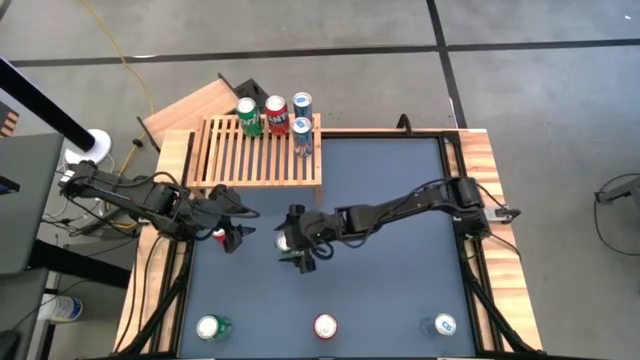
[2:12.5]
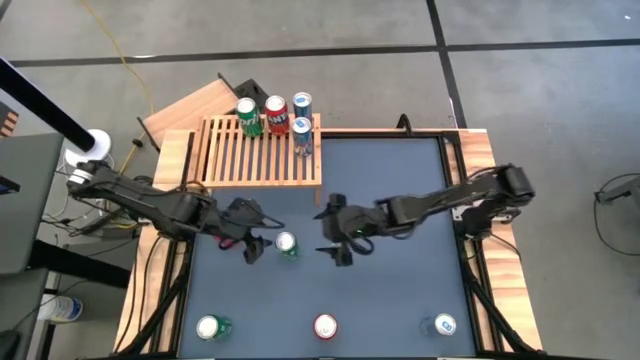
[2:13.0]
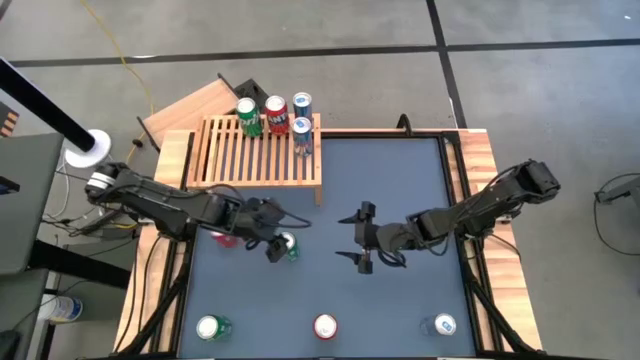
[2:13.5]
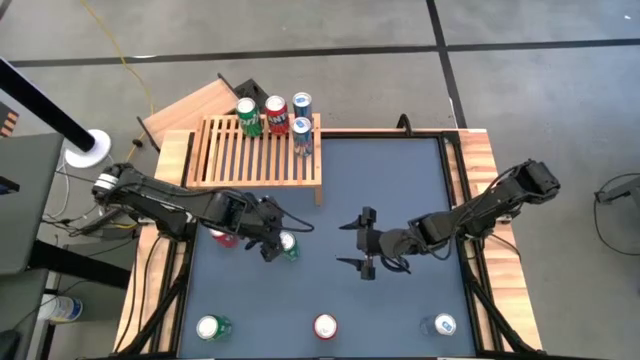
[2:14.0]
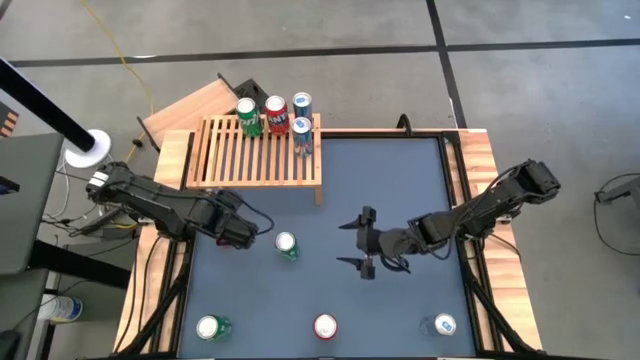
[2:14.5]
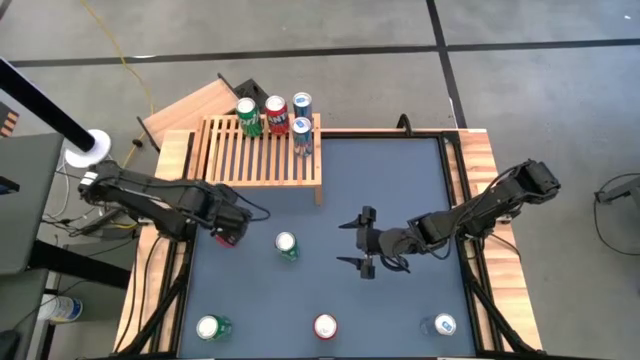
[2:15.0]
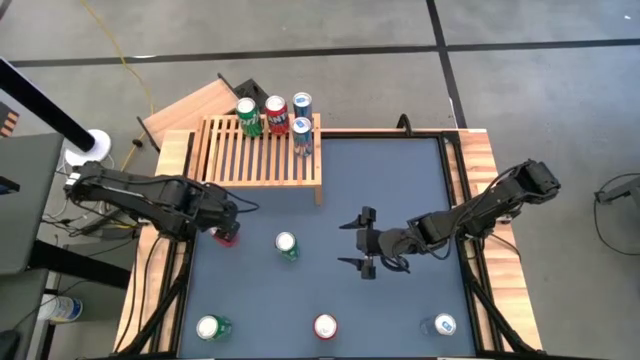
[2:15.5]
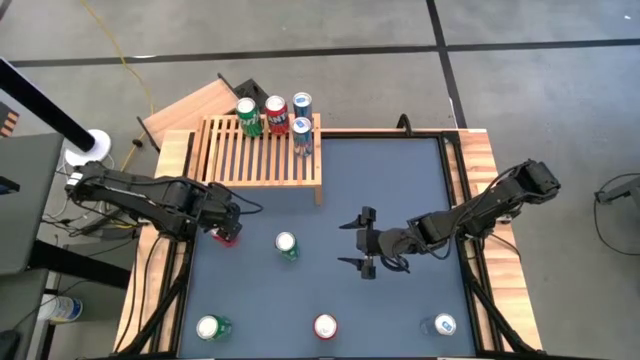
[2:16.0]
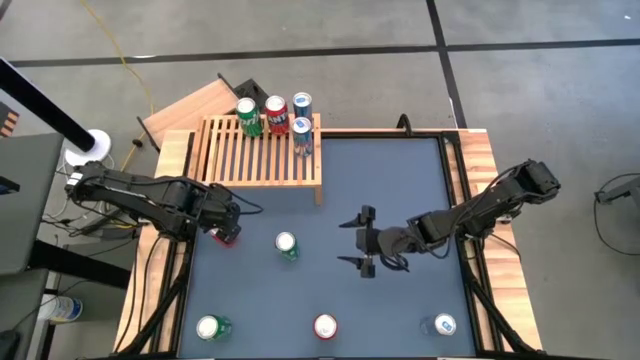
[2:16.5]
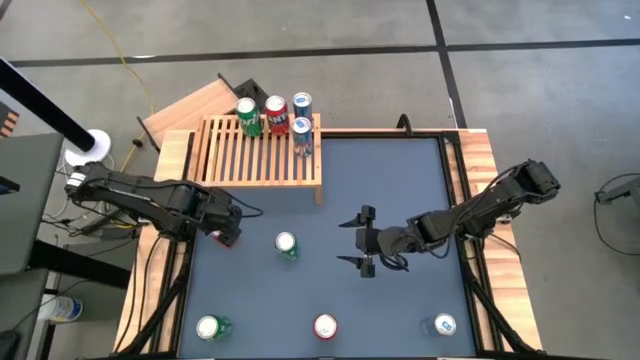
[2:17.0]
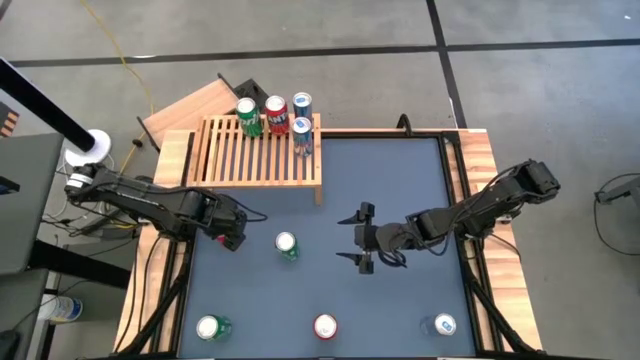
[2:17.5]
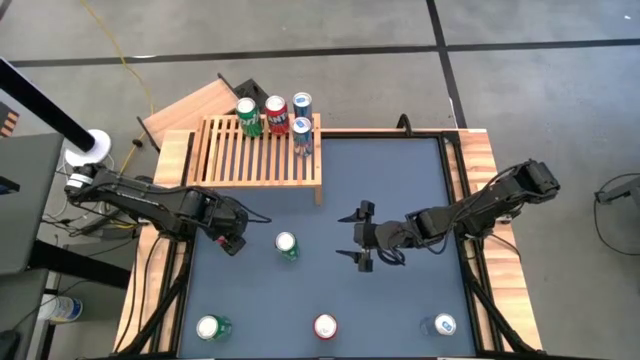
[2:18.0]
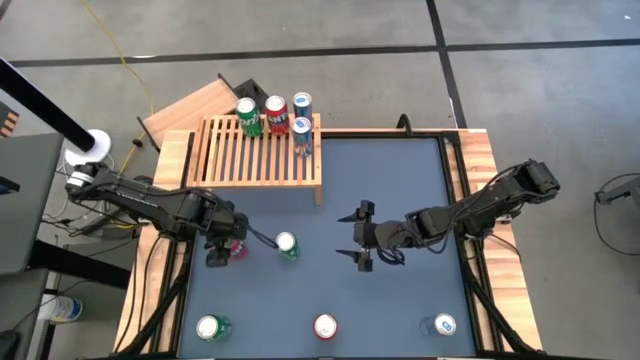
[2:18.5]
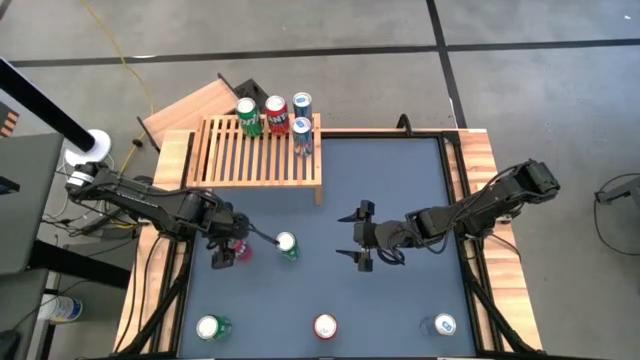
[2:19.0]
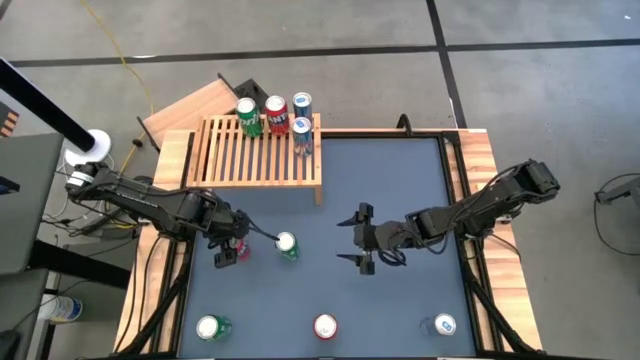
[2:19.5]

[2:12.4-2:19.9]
Task: Place canned beverage on shelf
Put the top red soda can on the shelf aligned with the other red soda can

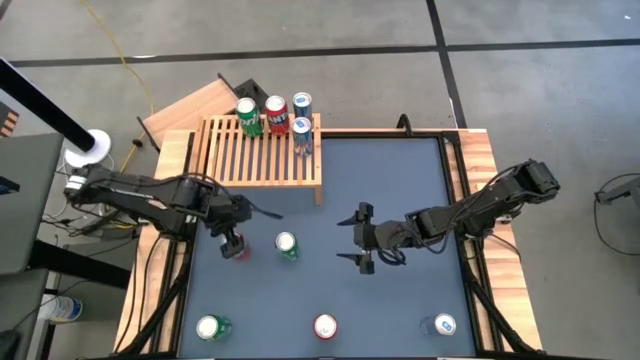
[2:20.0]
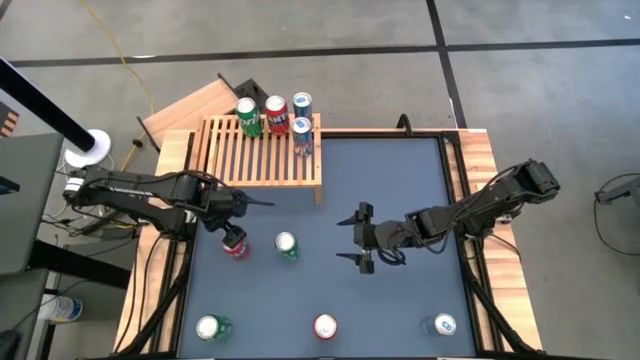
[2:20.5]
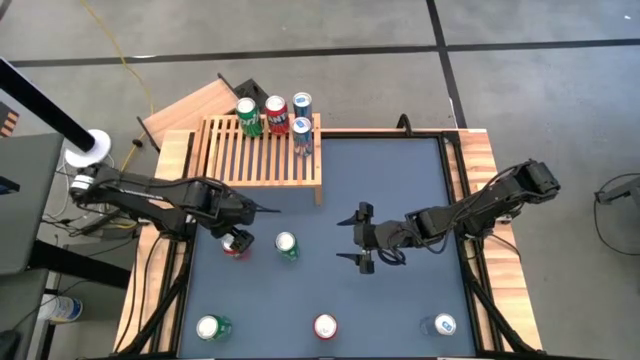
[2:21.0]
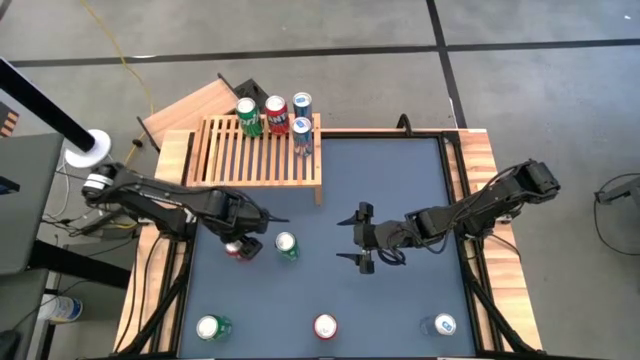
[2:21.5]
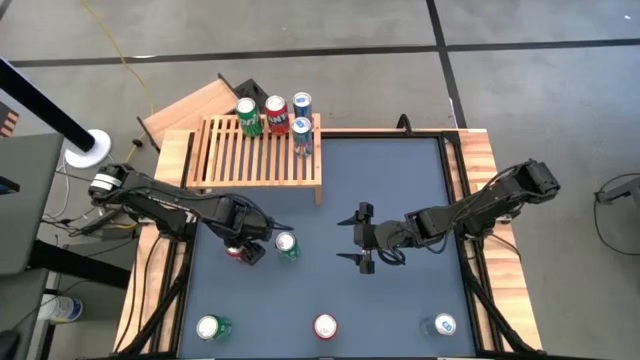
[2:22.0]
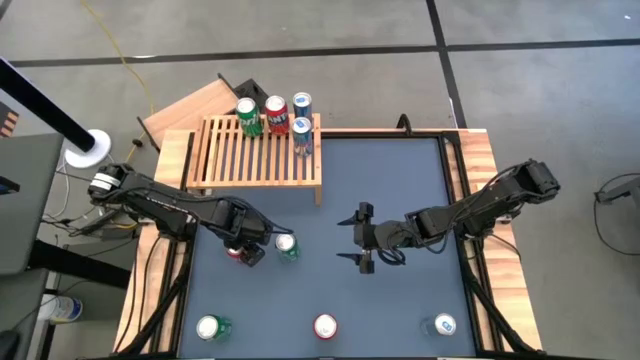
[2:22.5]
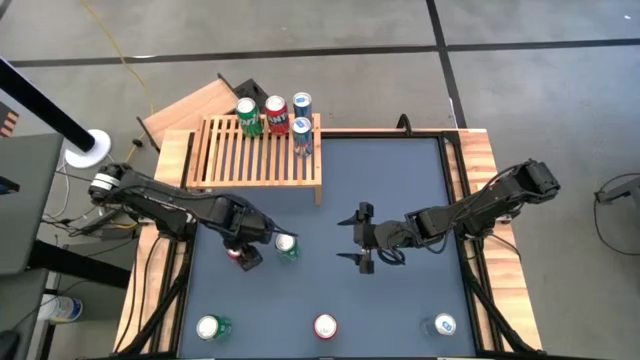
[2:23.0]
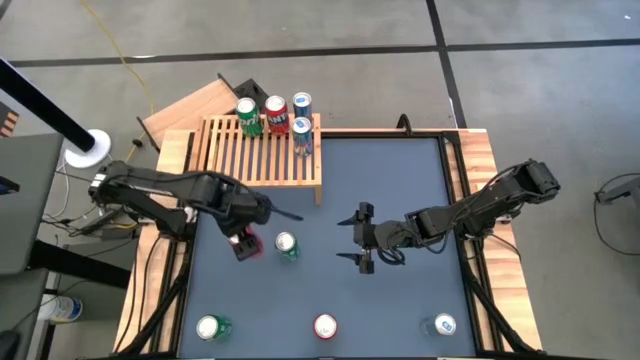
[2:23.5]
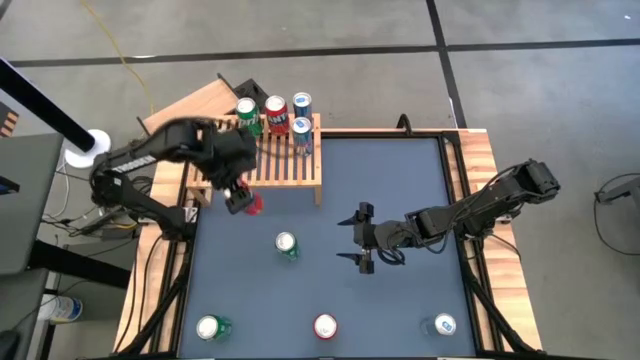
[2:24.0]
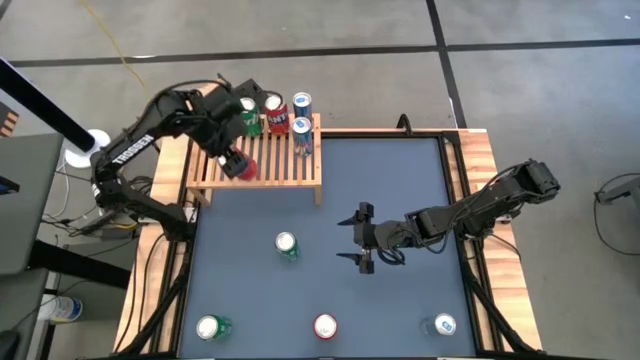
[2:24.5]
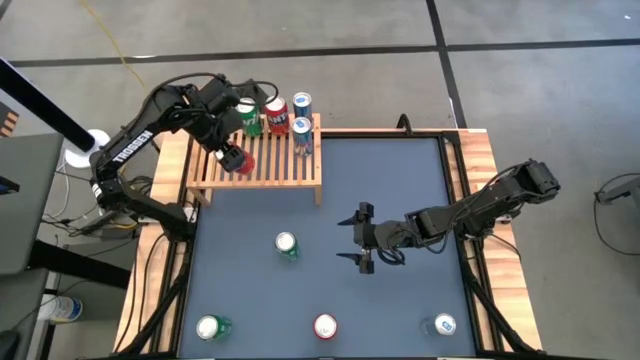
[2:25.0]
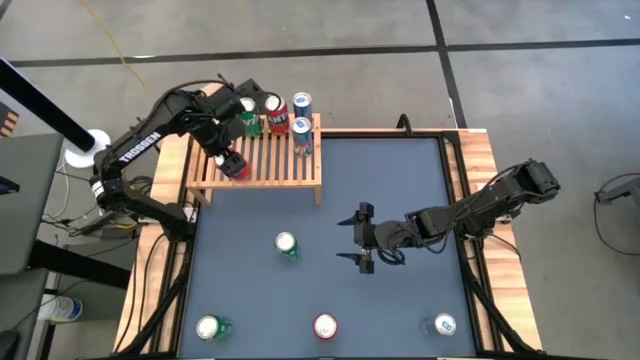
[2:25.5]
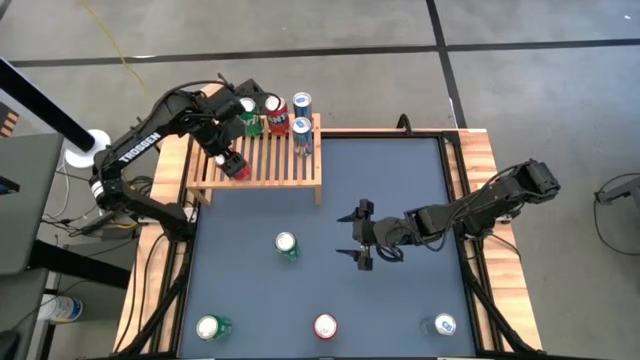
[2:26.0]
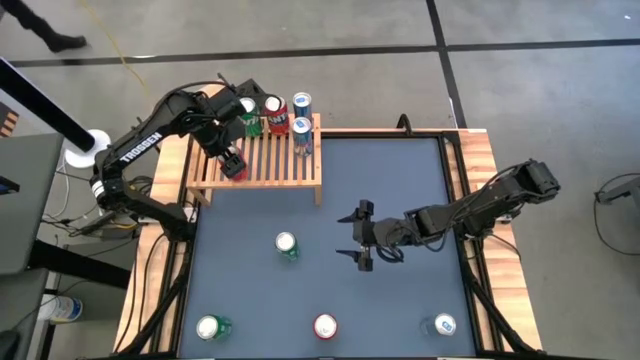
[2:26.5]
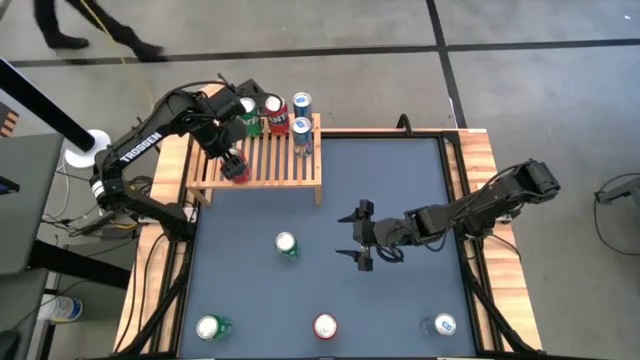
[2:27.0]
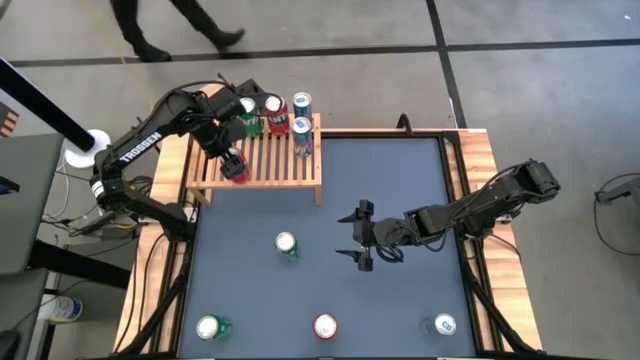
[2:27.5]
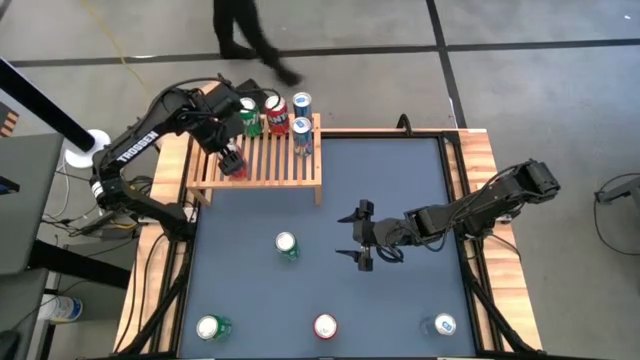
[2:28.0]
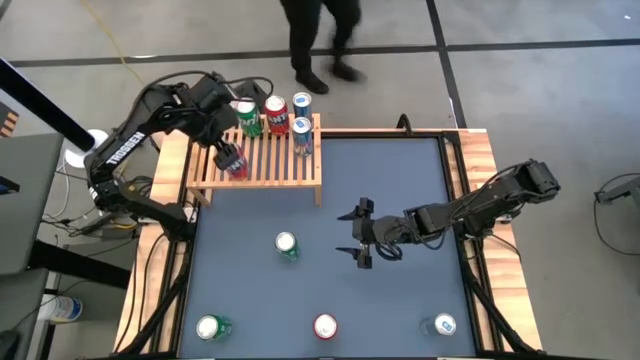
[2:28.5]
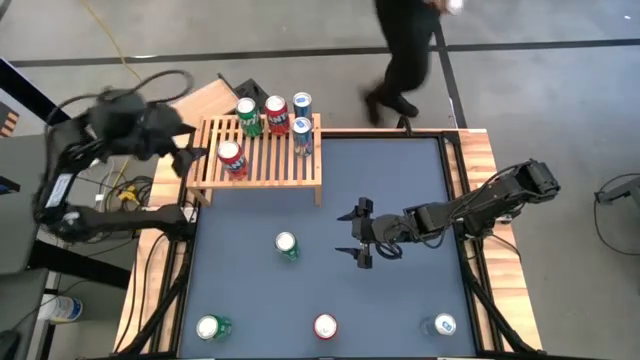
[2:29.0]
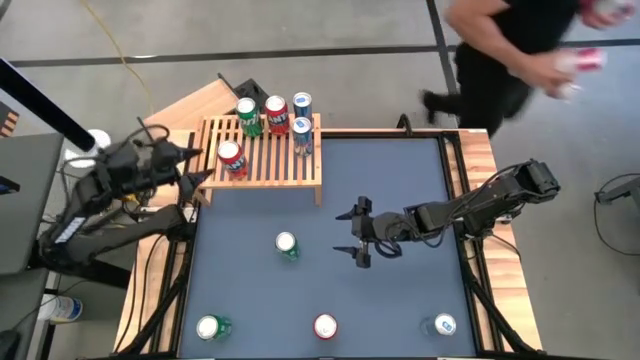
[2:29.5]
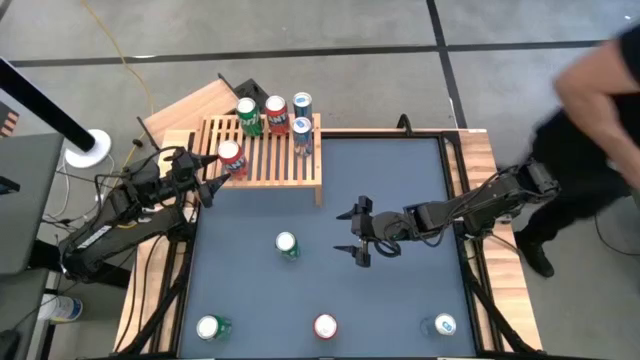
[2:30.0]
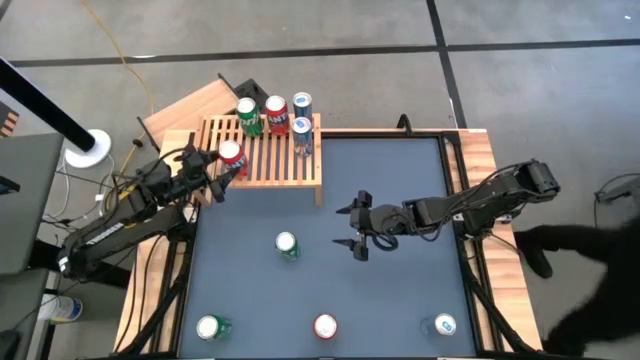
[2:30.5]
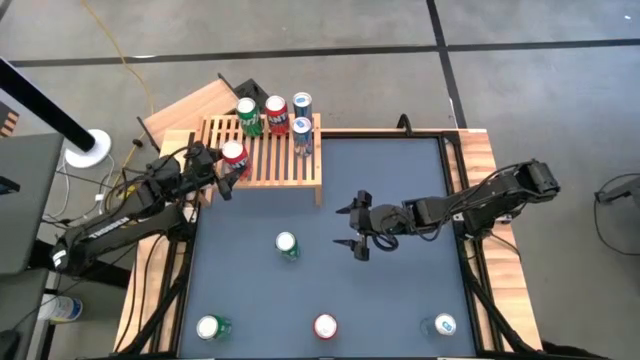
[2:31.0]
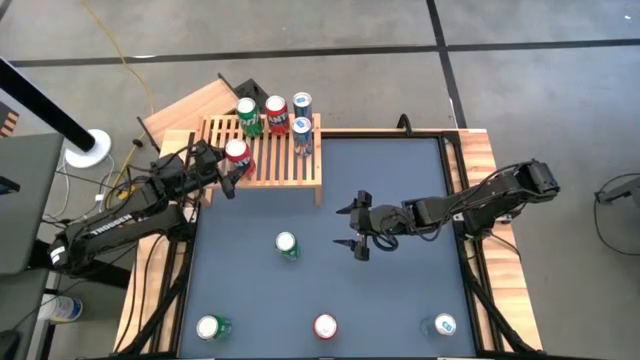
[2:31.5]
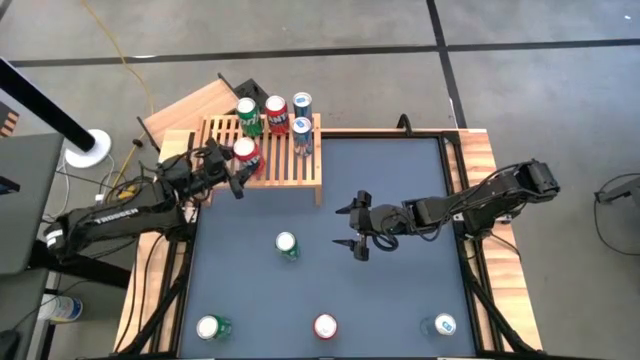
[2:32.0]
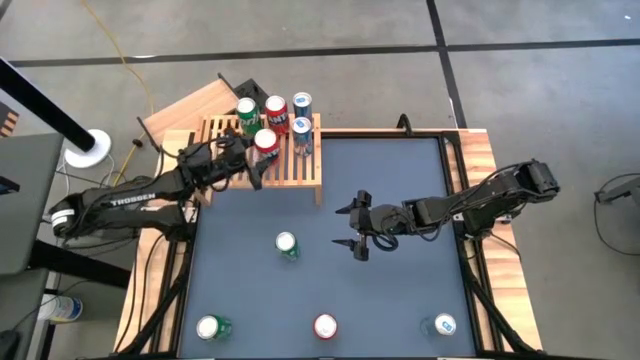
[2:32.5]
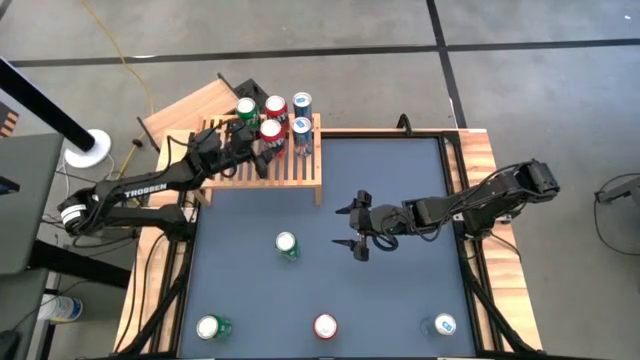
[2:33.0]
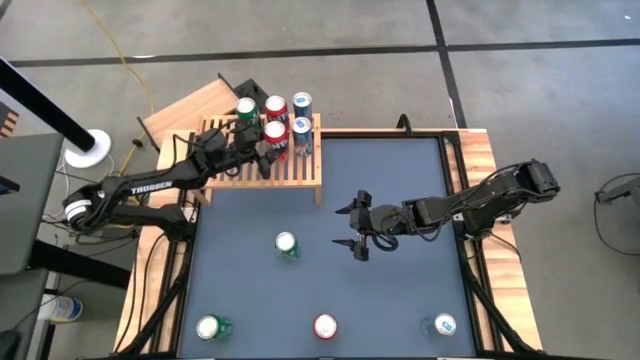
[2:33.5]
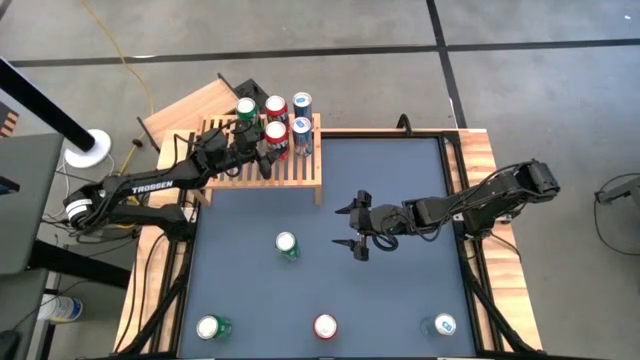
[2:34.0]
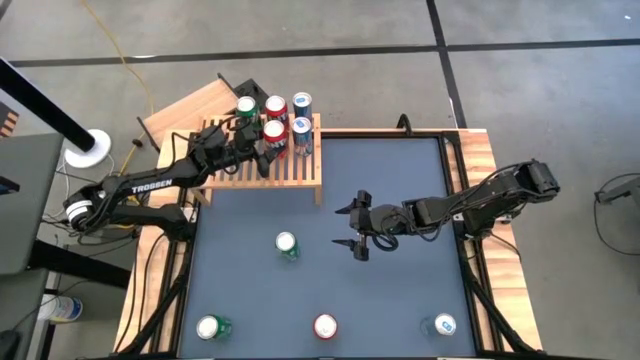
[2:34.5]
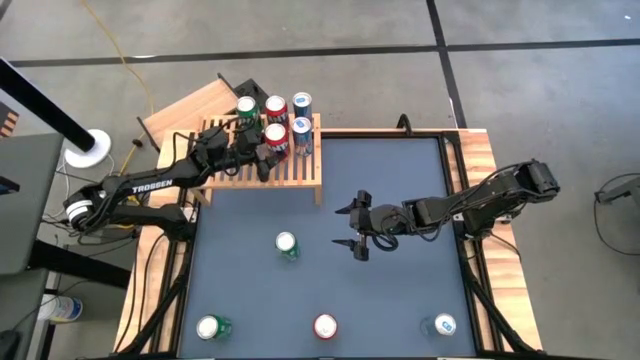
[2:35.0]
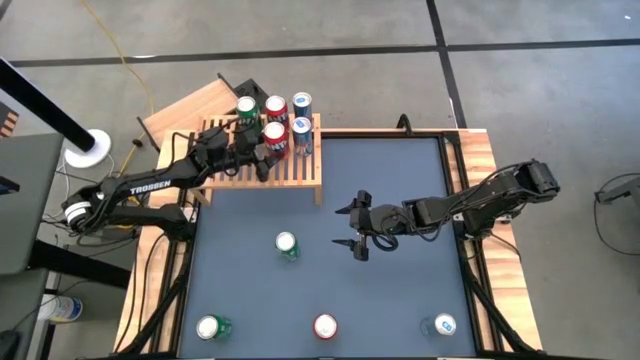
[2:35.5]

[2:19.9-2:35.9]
Put the top red soda can on the shelf aligned with the other red soda can
